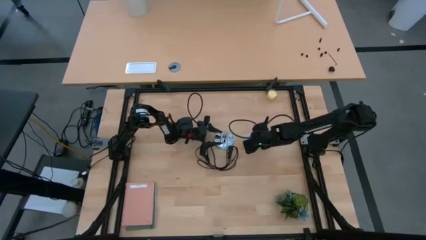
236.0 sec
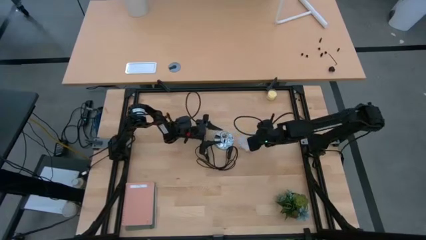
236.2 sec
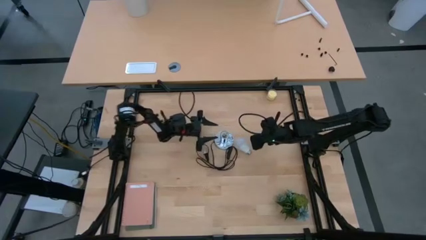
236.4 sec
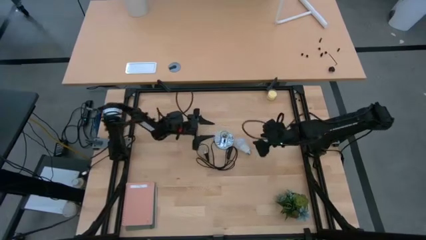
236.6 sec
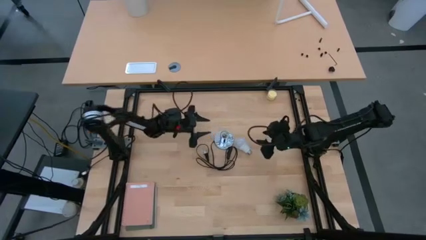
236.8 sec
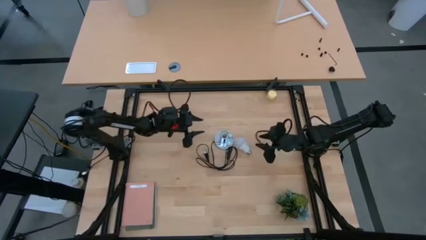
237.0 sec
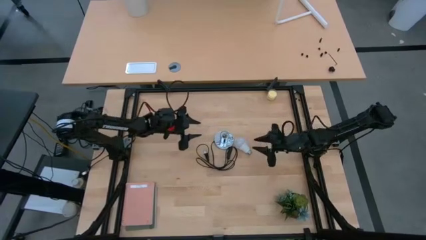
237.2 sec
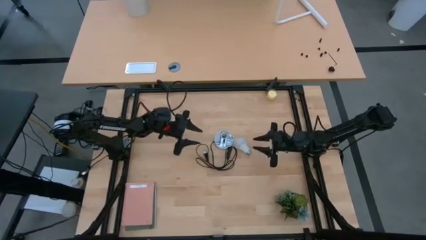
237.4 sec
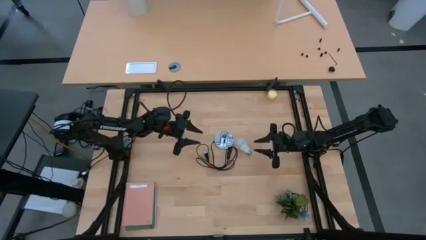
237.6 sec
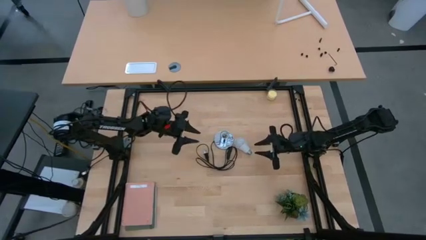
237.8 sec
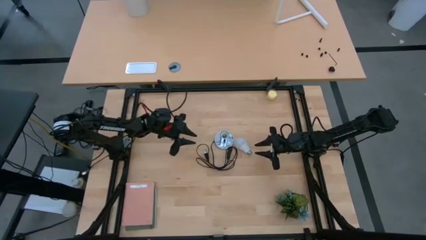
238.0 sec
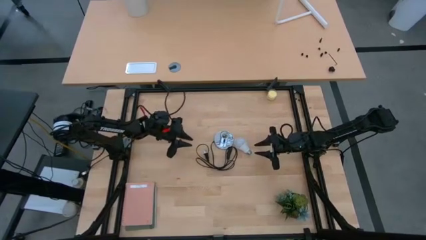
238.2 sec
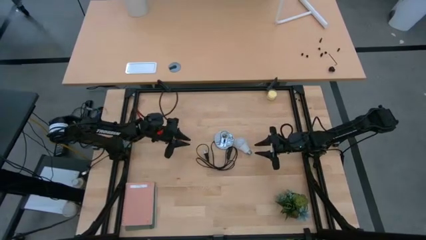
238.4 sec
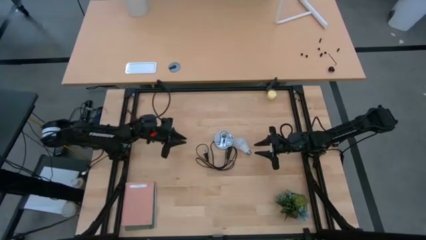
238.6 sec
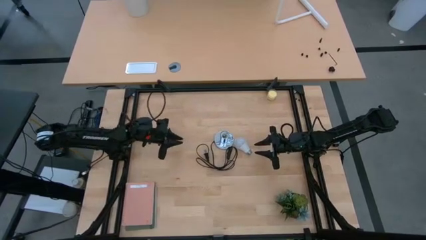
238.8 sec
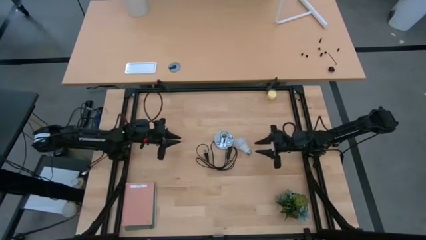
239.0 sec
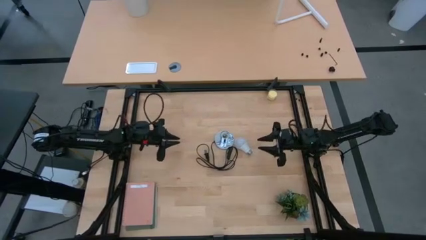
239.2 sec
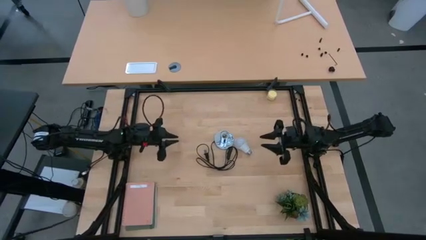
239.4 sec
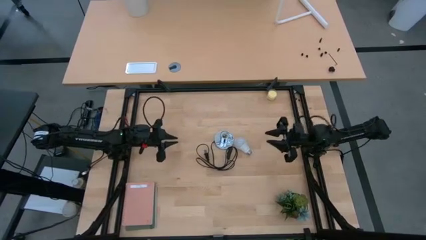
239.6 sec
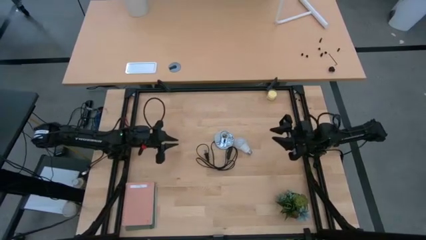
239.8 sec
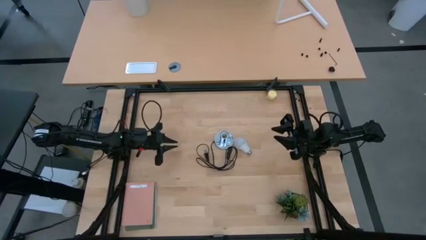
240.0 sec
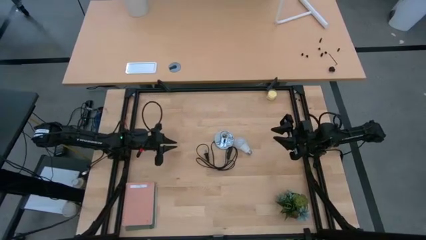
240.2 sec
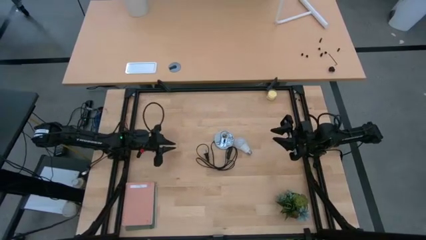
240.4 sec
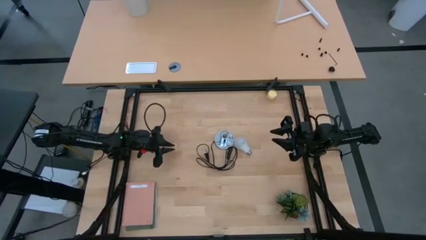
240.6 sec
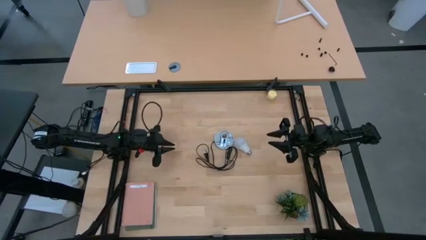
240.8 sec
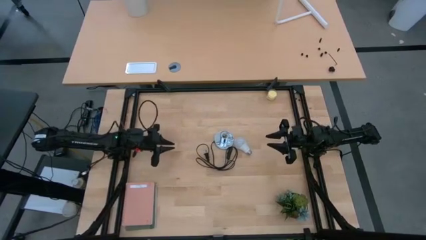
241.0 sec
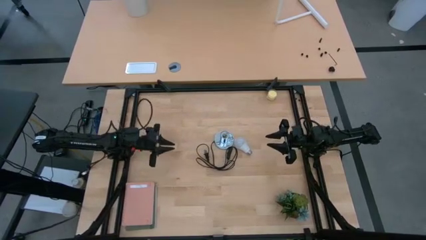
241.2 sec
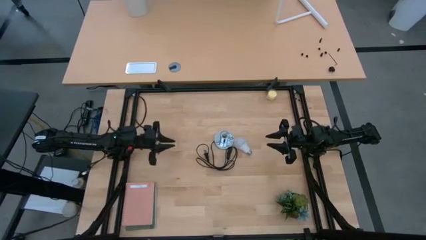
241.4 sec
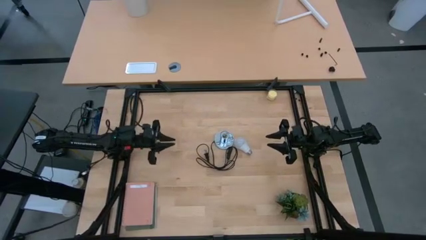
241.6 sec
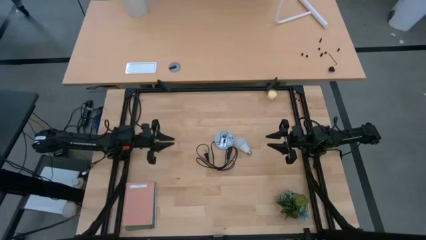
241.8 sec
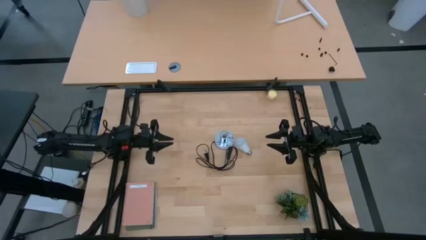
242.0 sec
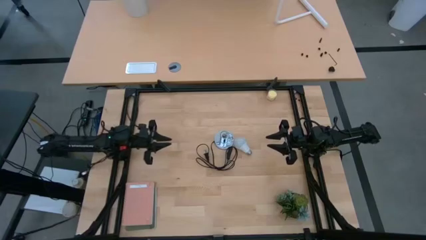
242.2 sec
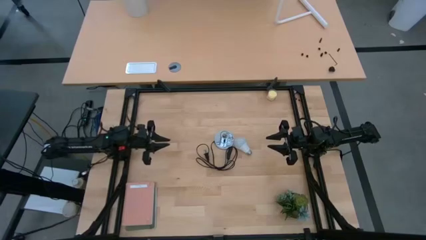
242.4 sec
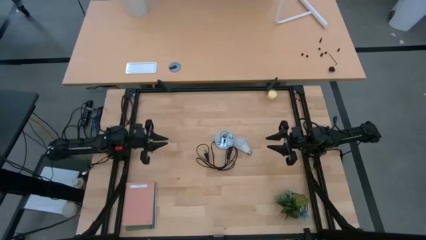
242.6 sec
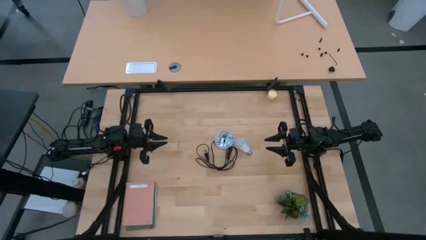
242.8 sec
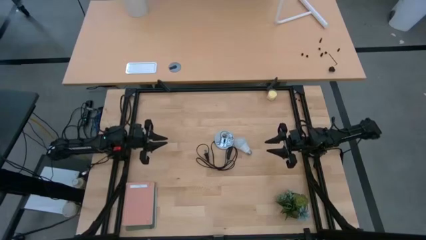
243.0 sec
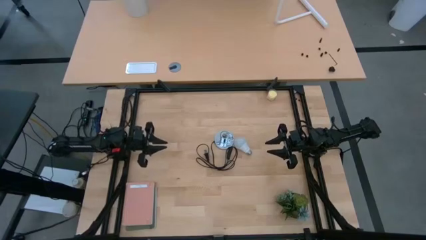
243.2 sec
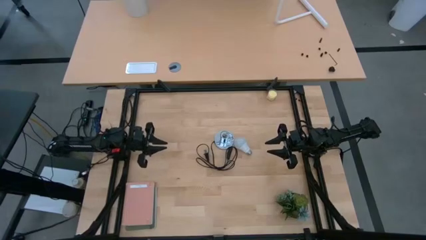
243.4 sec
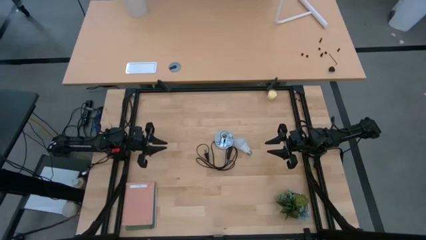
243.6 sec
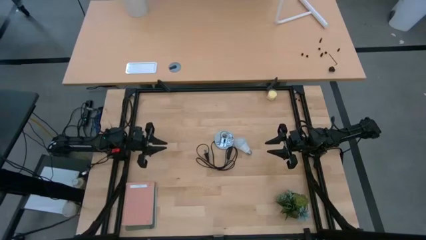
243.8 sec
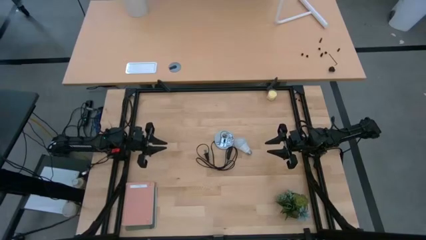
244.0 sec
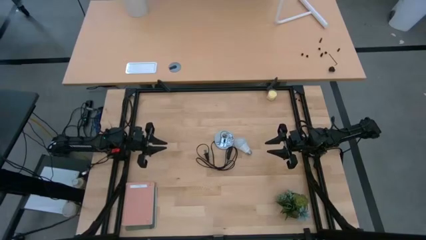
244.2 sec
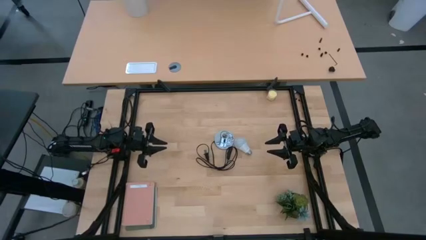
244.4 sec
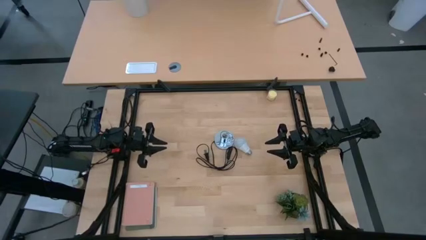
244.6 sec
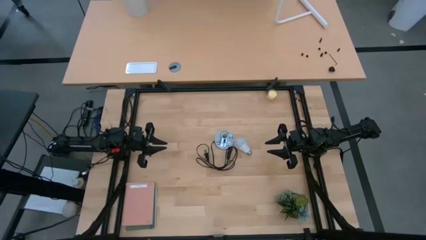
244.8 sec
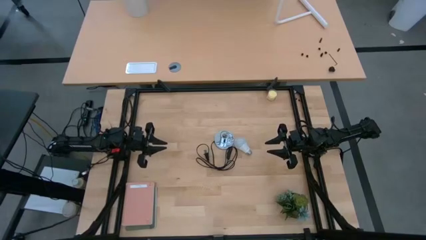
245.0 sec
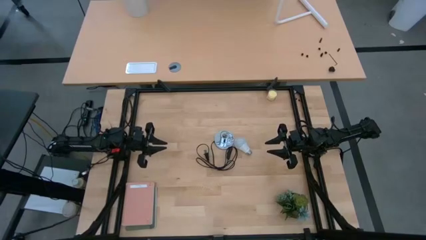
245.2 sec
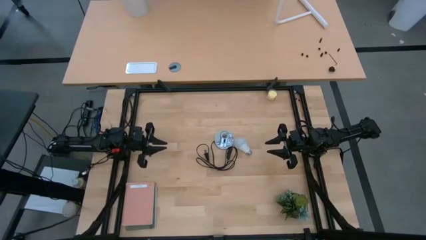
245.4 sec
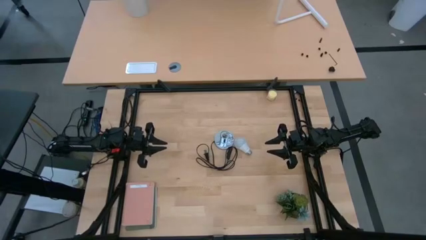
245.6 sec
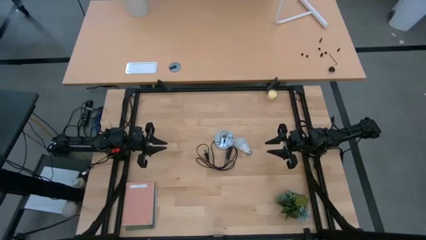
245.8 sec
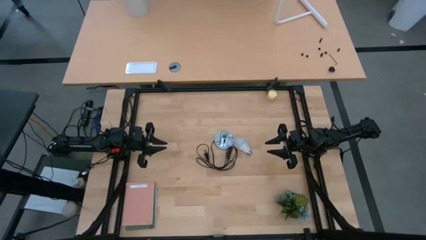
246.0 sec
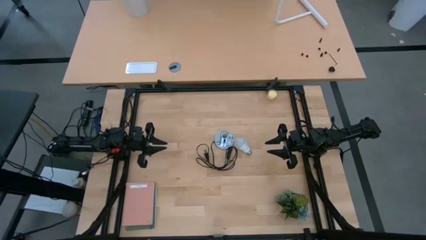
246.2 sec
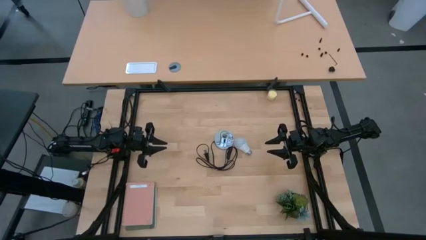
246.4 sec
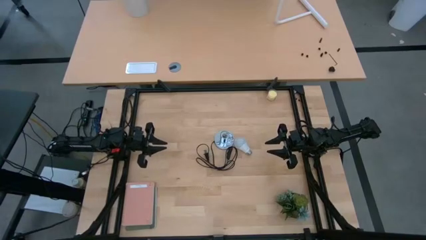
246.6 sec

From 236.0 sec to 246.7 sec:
Task: Screw lightbulb
Return to Home Position

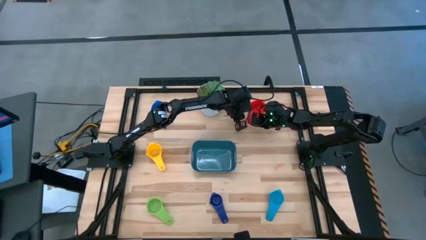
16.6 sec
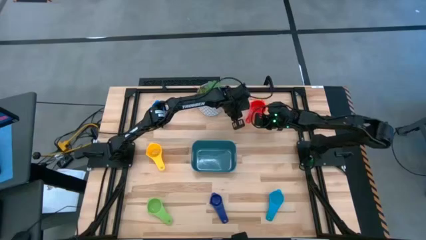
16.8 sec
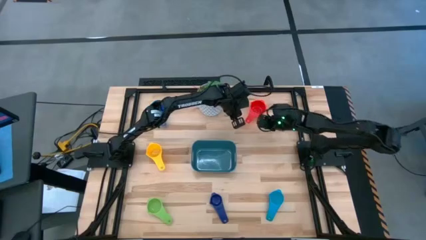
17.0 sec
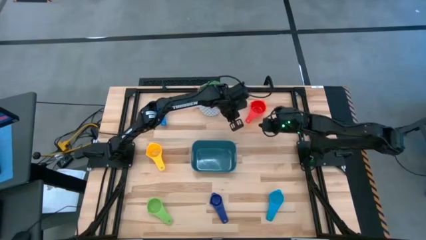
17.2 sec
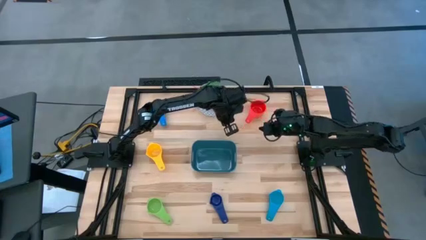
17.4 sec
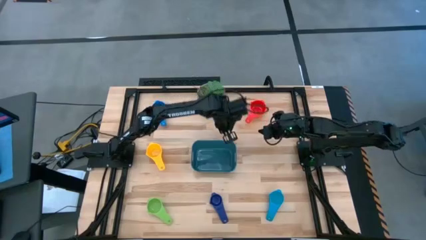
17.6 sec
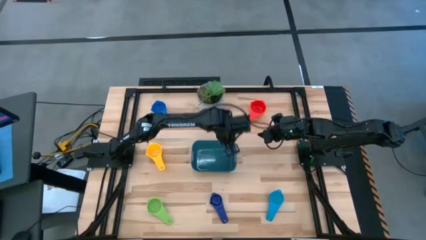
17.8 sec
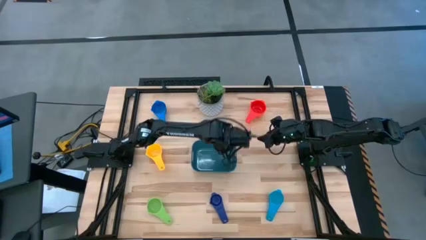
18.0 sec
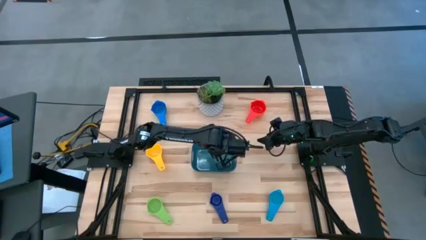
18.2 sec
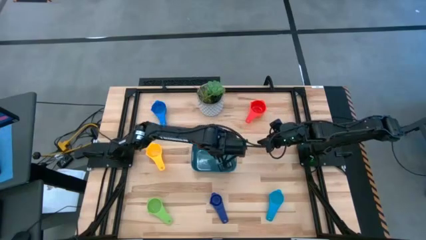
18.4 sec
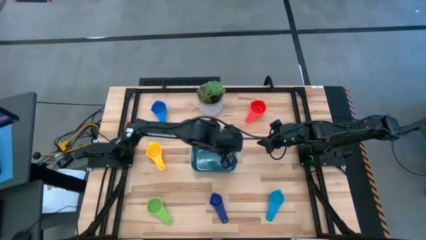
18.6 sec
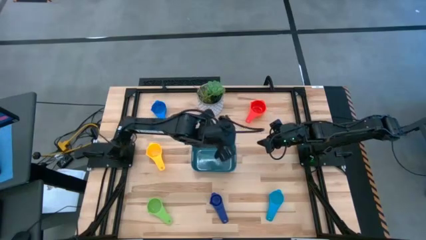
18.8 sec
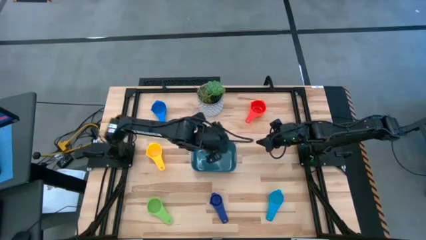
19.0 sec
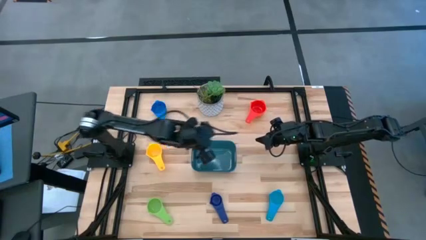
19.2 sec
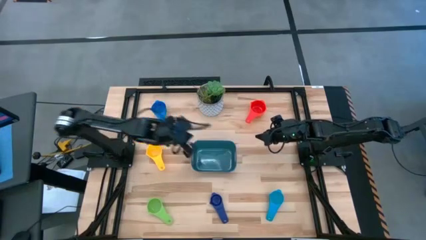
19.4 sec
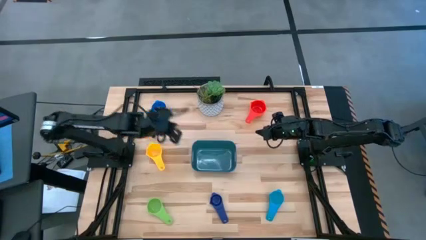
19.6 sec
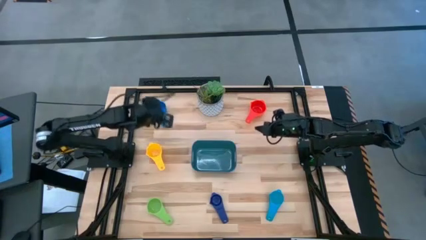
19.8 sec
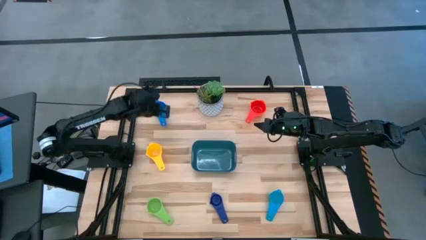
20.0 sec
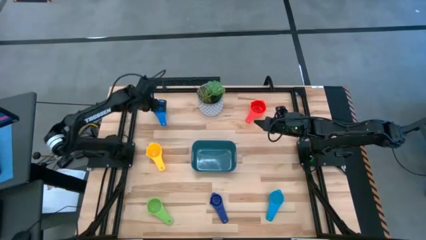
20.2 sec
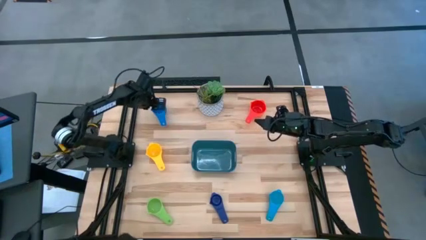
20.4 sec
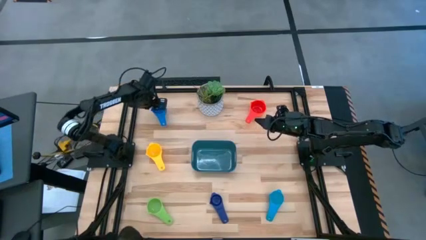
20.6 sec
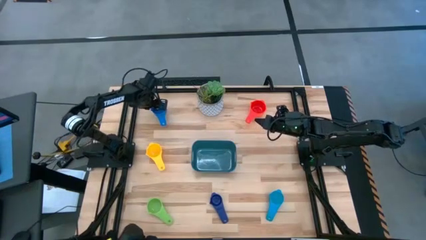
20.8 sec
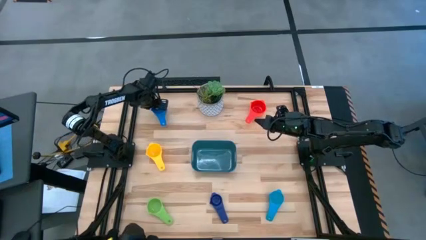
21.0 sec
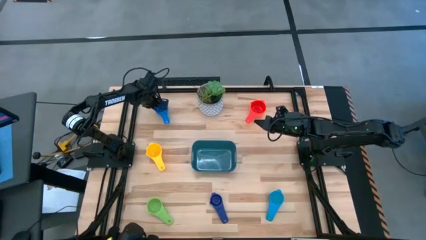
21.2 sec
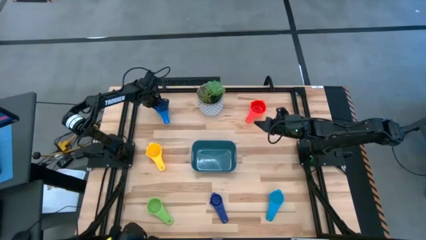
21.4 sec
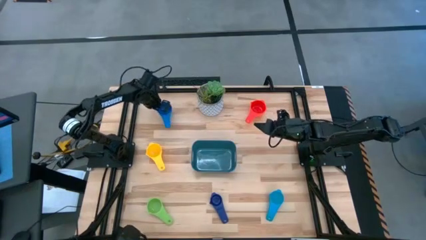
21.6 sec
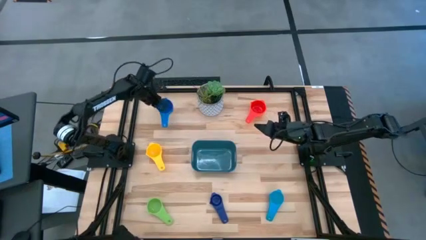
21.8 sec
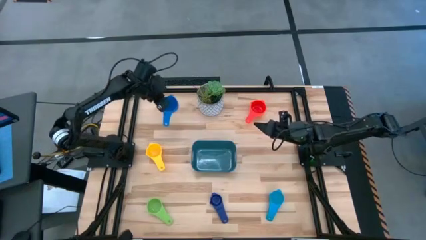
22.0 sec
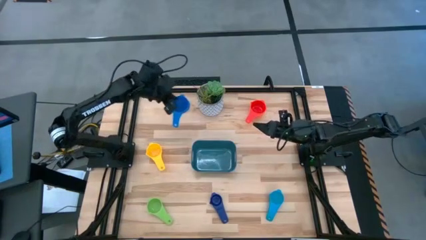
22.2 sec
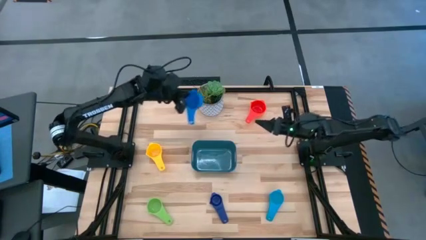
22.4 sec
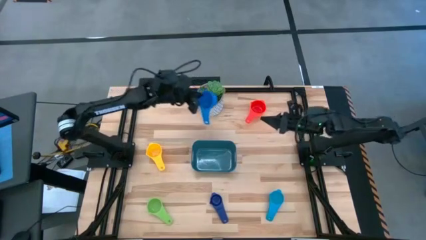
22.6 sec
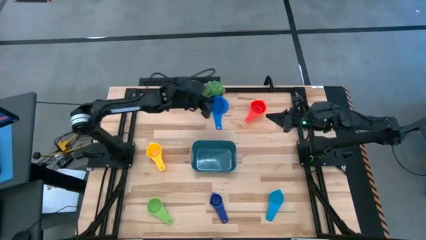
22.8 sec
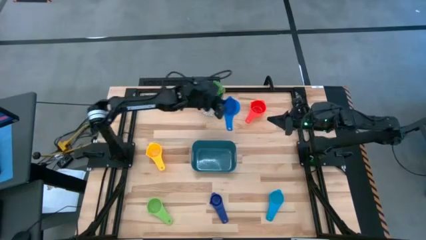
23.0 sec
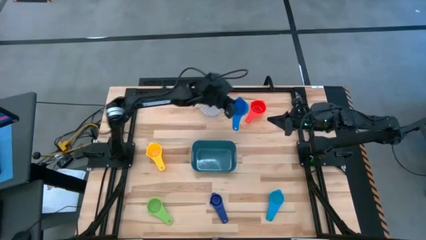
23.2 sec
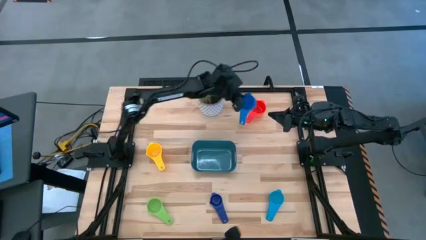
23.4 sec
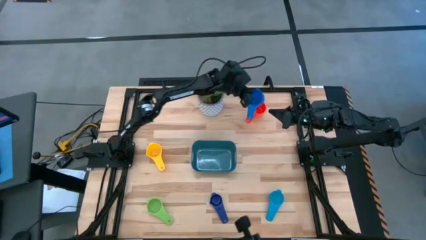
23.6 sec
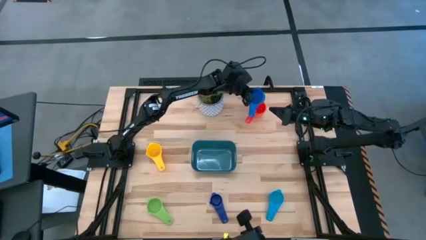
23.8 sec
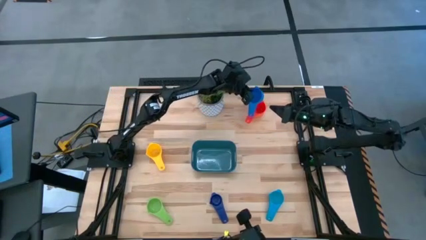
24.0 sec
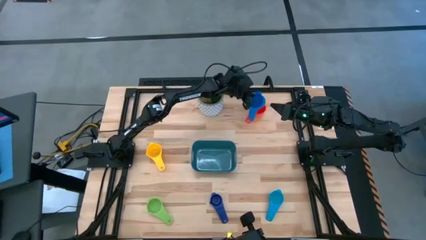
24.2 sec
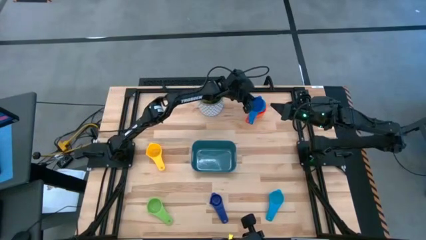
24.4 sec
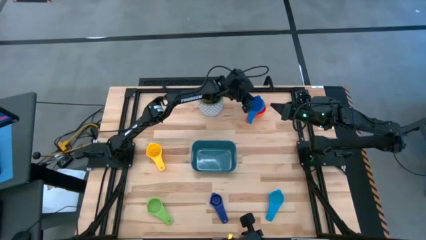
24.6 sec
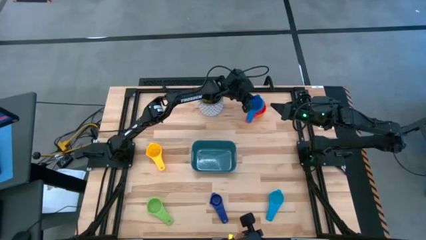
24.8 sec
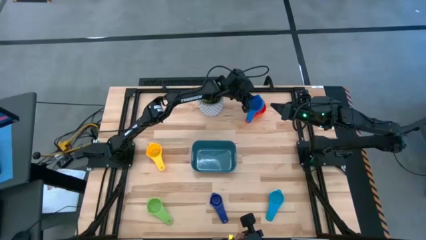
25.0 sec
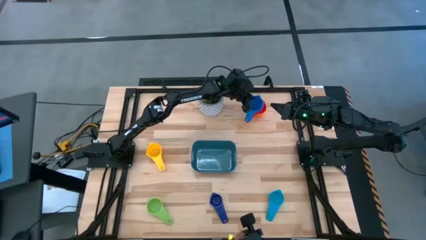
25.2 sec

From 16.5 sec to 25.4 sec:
Task: Nest measuring cups in basket
Stack the blue measuring cup on top of the red measuring cup
